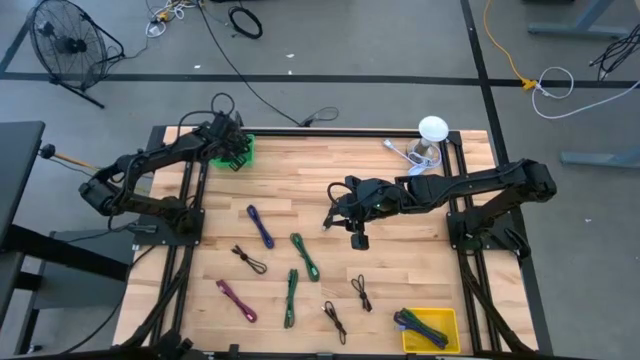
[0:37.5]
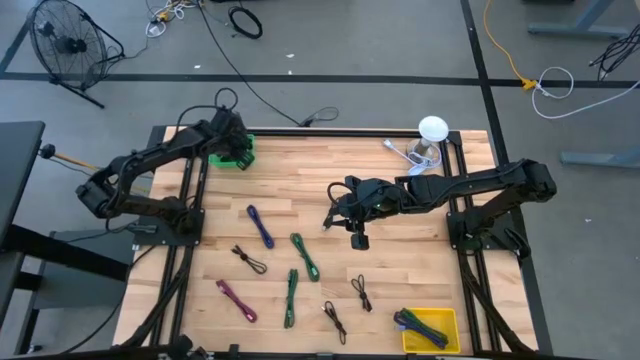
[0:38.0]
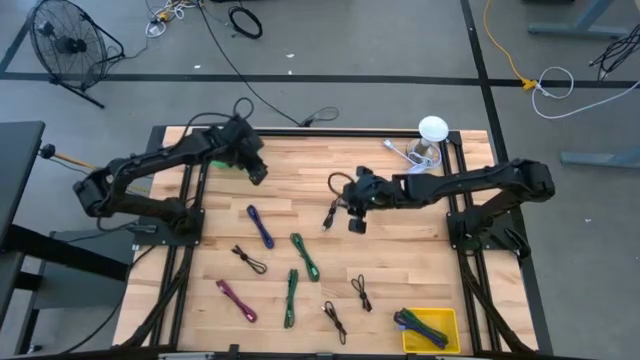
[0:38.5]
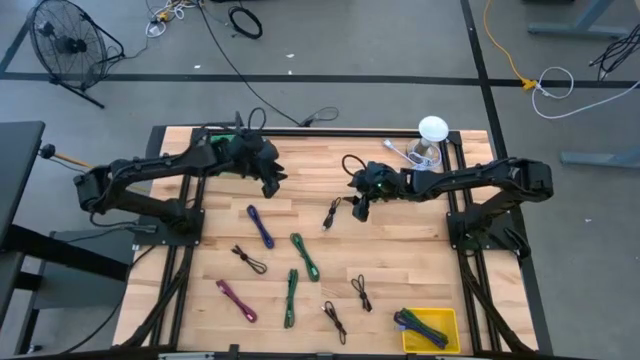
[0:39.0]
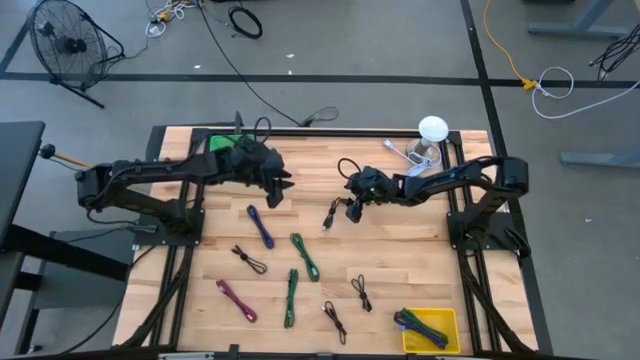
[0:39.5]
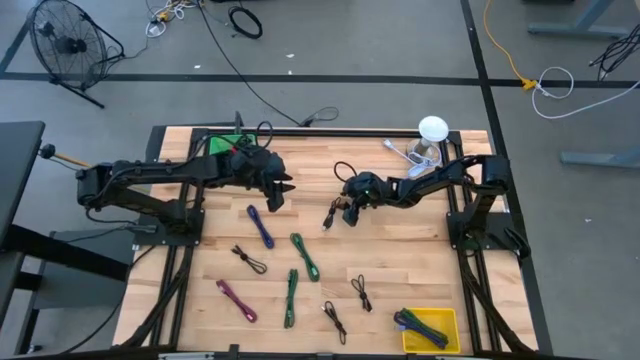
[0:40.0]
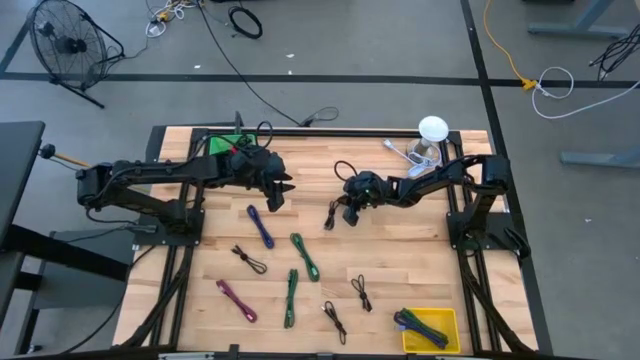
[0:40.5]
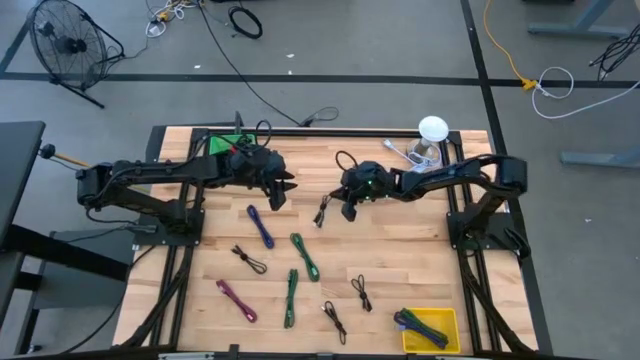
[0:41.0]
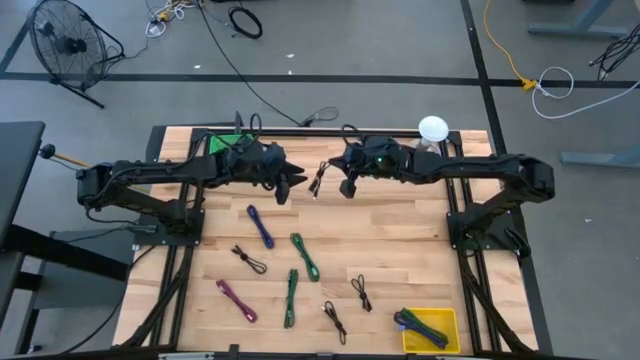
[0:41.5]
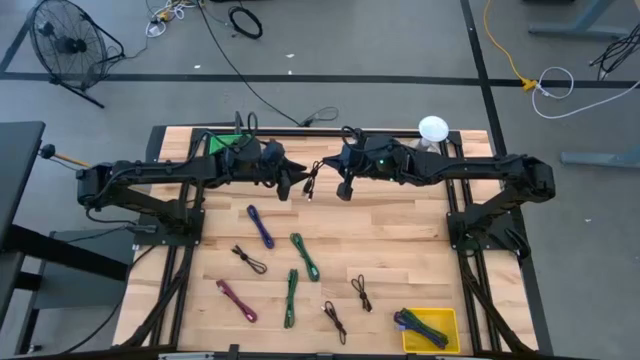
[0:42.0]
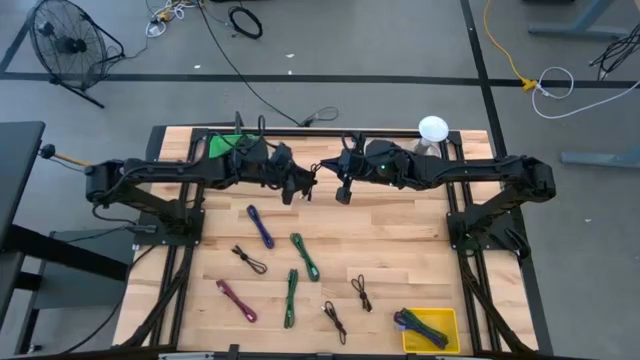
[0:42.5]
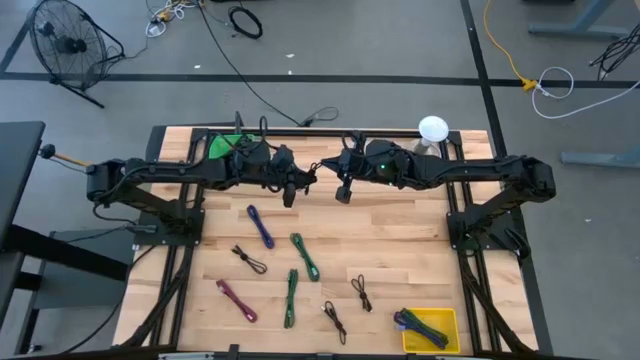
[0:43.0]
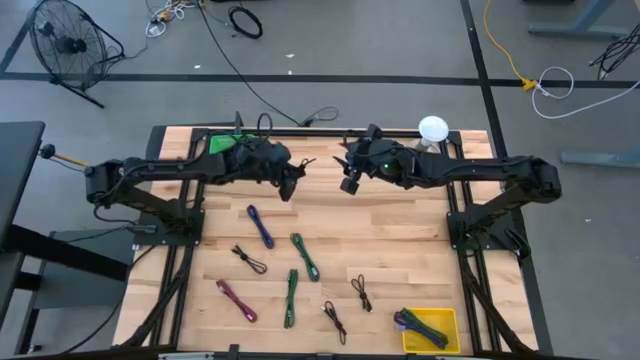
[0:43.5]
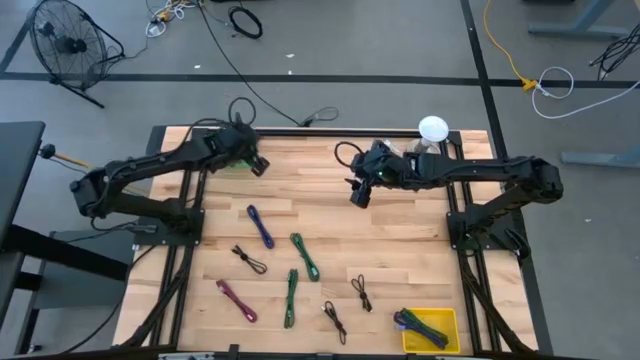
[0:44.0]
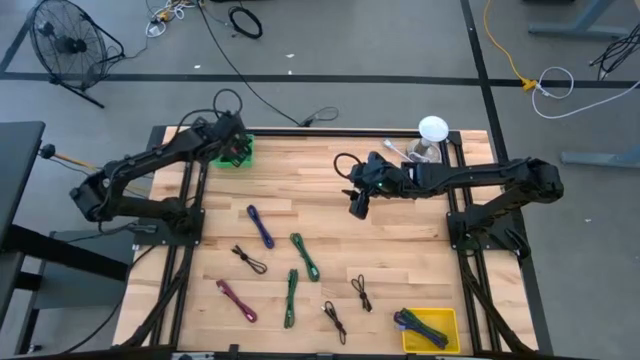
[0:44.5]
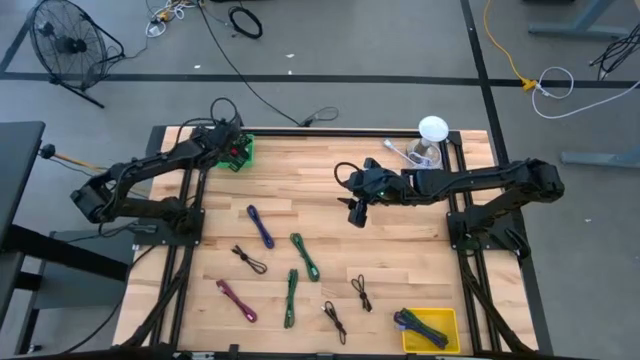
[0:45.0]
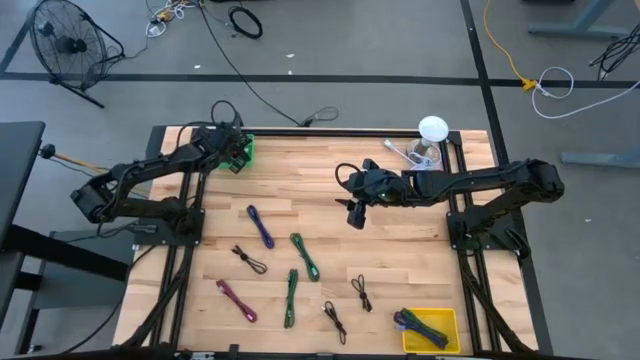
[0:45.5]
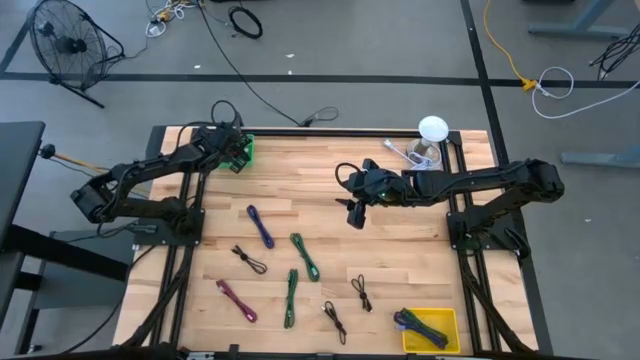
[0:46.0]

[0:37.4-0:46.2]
Task: Pick & Place USB Port
Put the black charger cable into the green bin

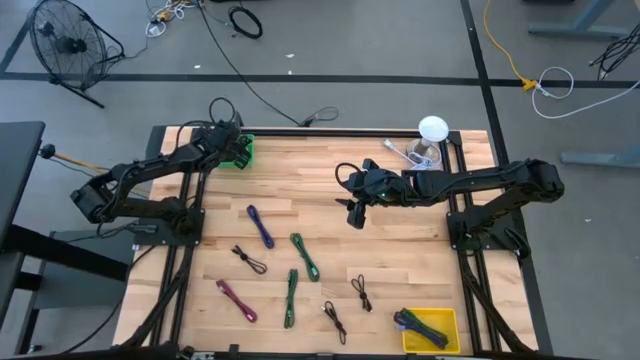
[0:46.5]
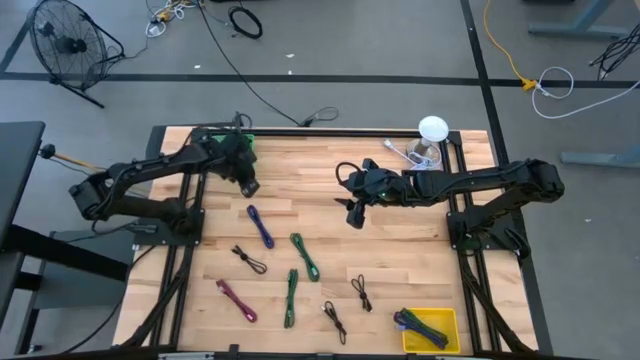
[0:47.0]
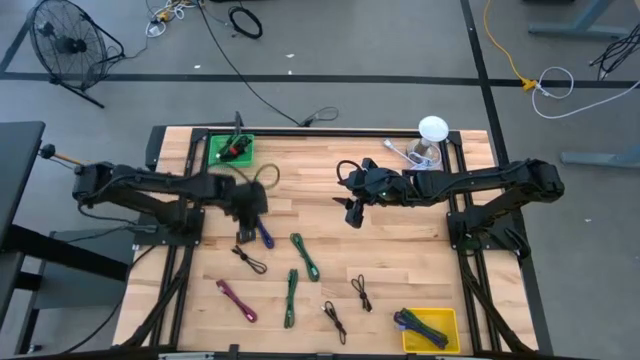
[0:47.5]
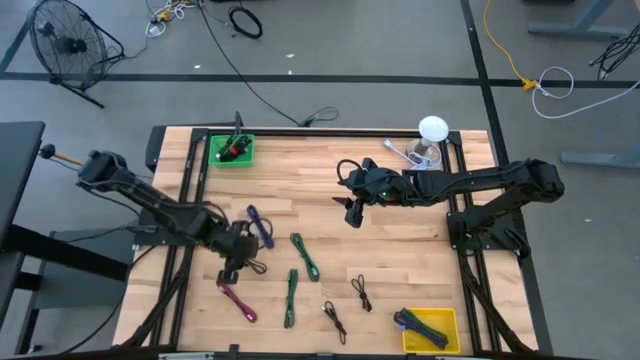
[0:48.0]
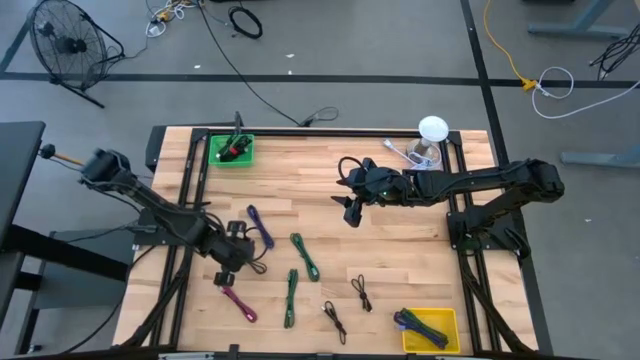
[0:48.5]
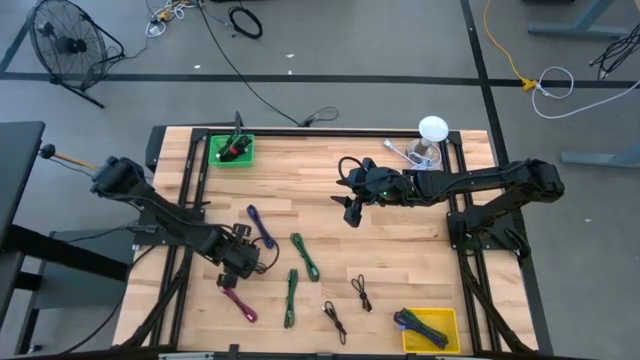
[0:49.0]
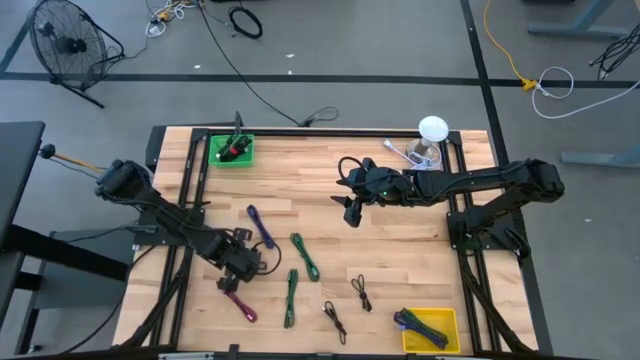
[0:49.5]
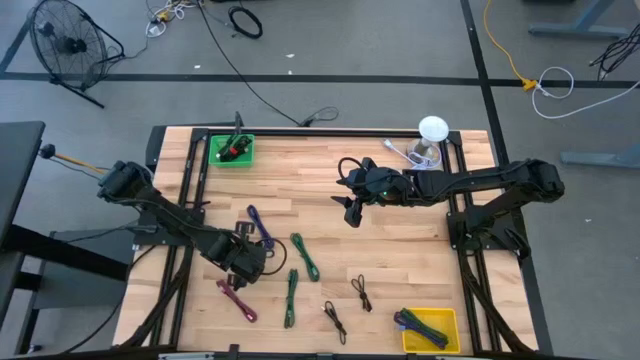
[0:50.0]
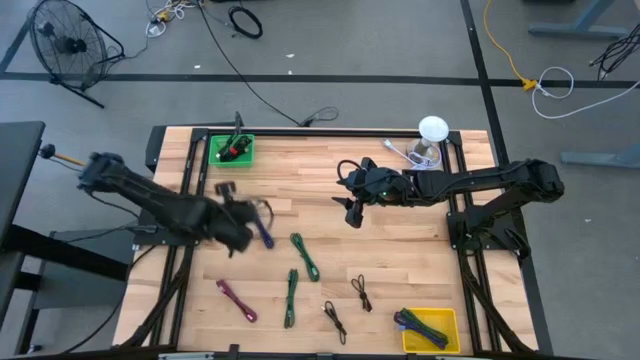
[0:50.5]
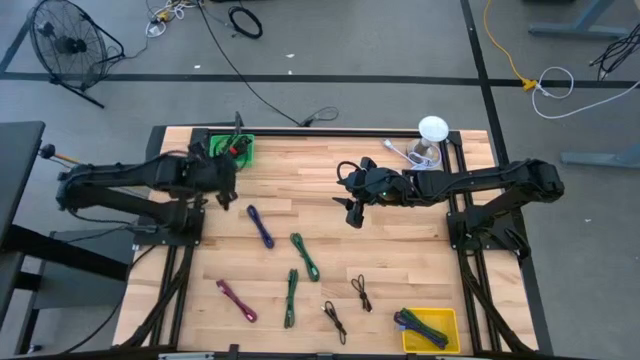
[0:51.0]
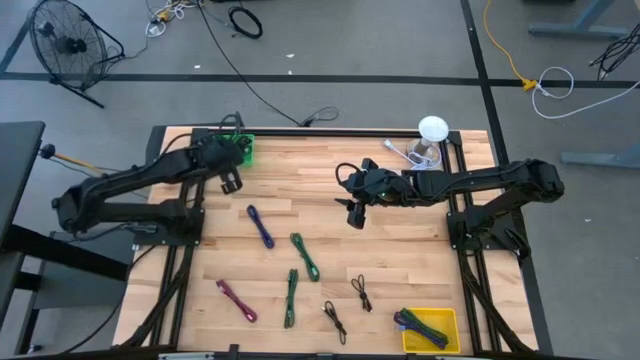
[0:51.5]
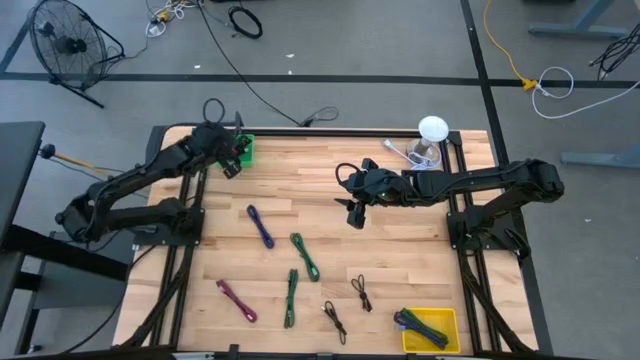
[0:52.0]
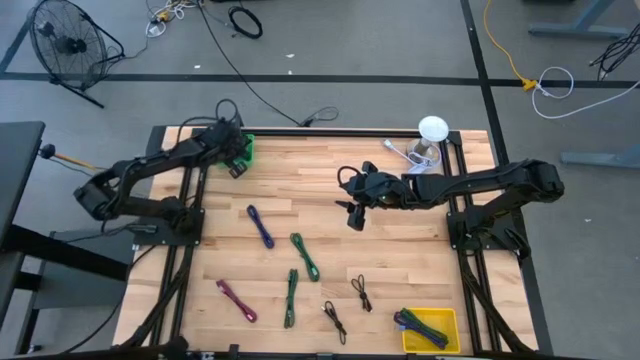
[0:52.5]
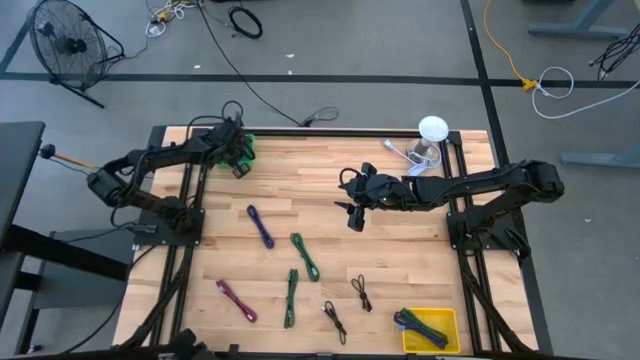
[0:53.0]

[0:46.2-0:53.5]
Put the black charger cable into the green bin

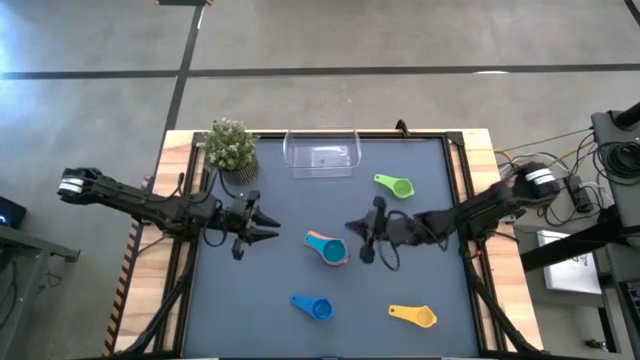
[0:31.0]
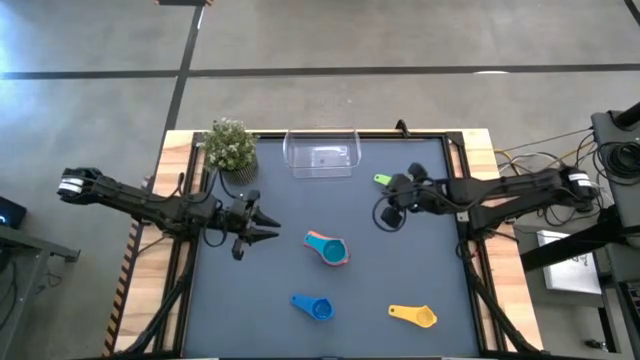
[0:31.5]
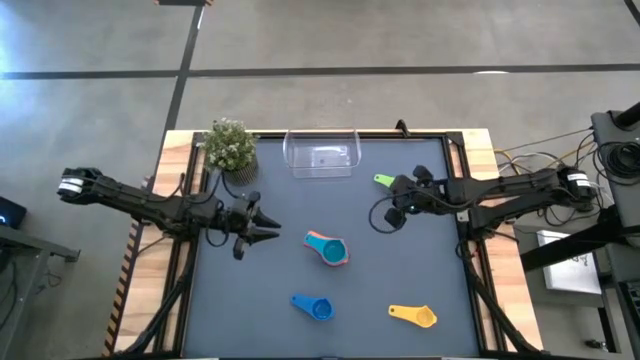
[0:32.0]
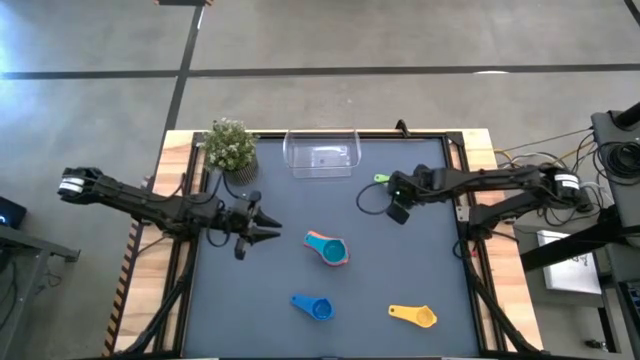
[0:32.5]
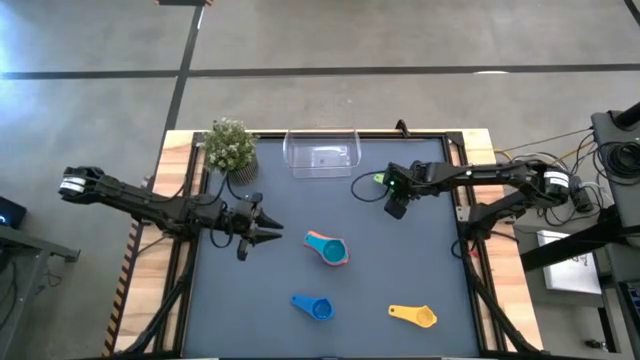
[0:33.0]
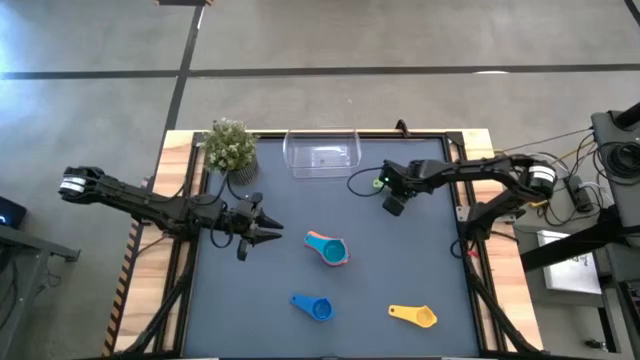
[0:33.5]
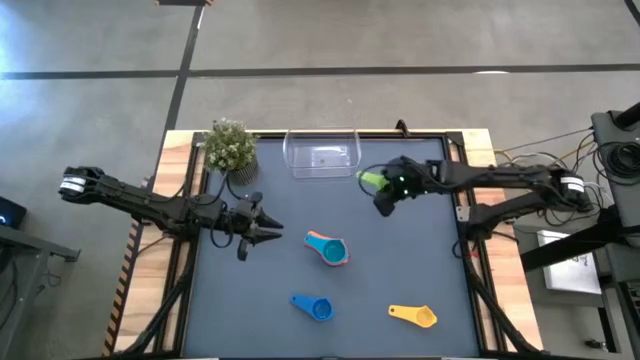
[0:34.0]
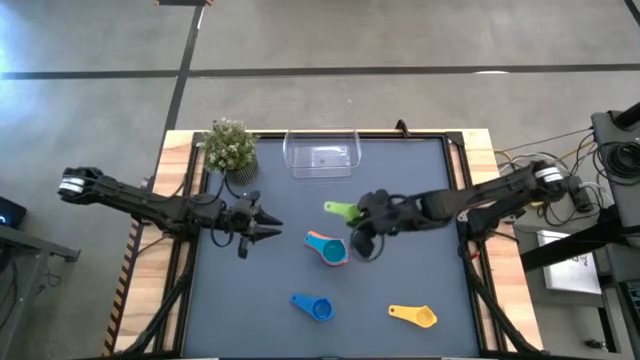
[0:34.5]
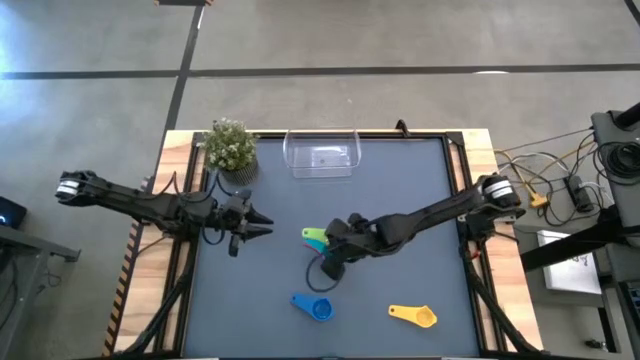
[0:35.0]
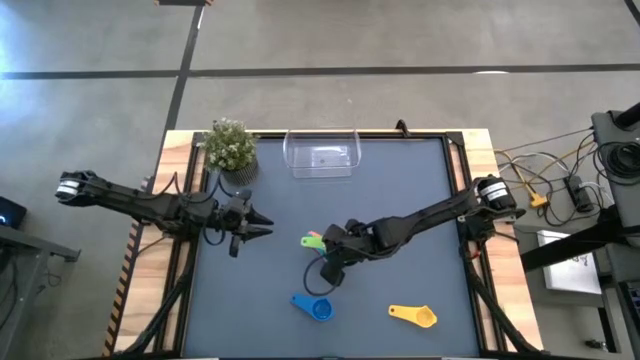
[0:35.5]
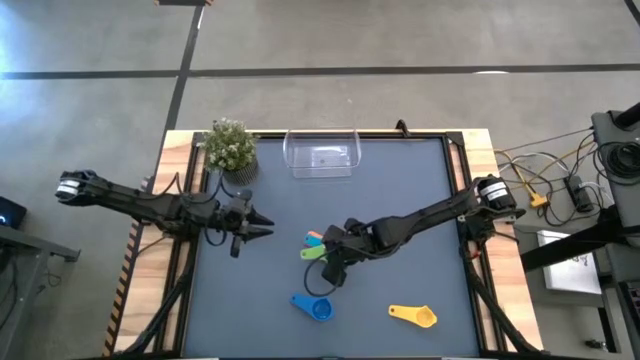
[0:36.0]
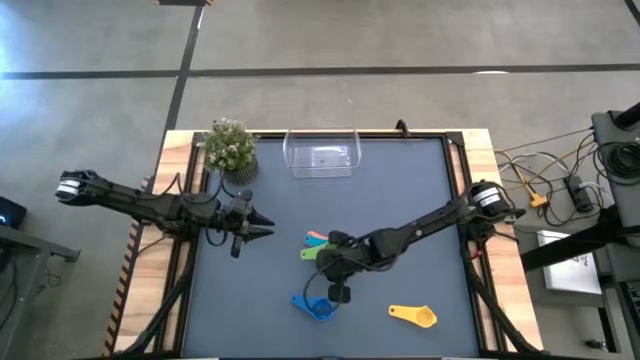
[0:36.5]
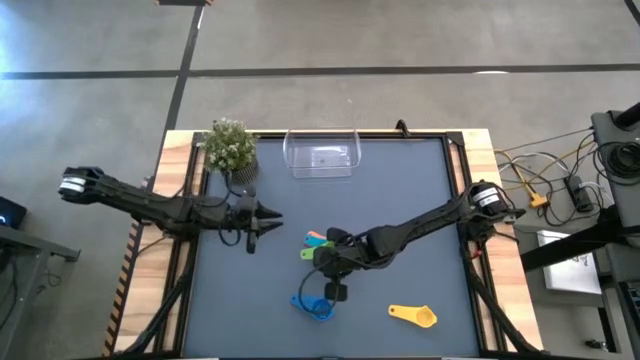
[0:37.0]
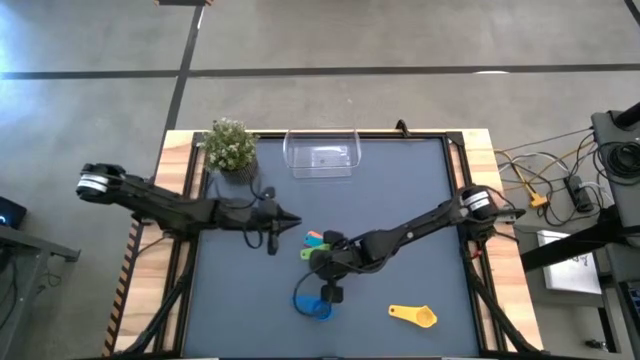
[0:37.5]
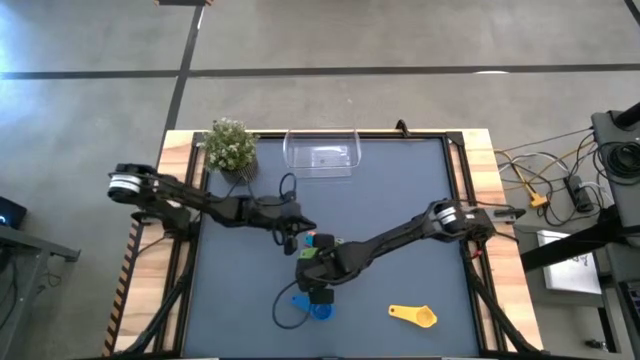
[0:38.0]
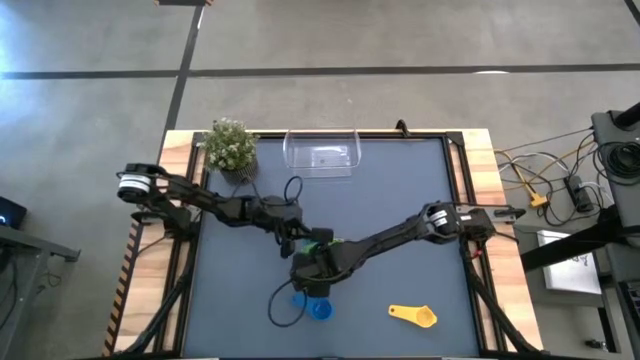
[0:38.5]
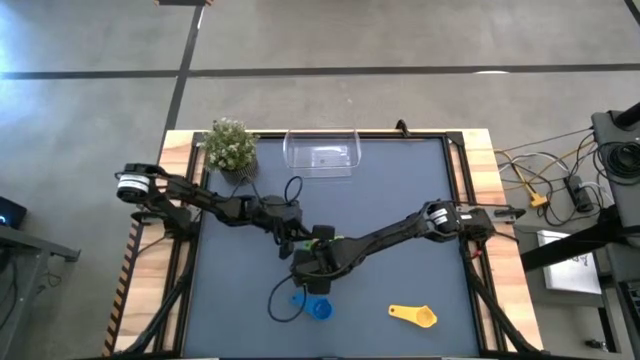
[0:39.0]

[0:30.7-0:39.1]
Task: Nest measuring cups in basket
Stack the green measuring cup on top of the light blue measuring cup
